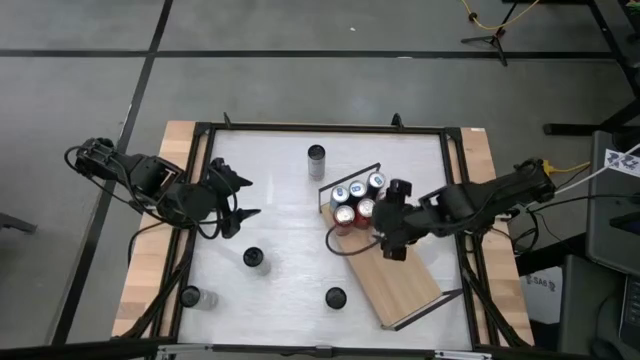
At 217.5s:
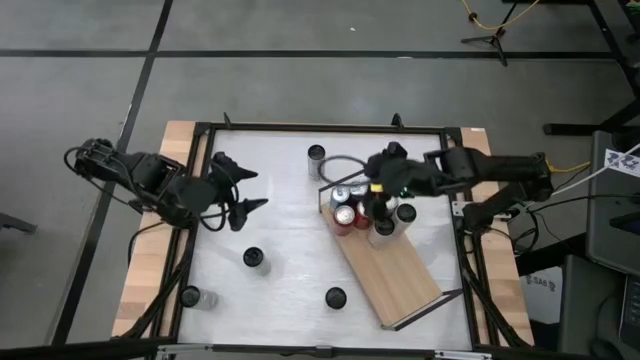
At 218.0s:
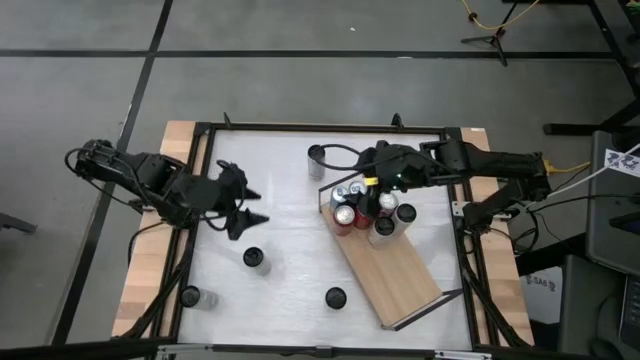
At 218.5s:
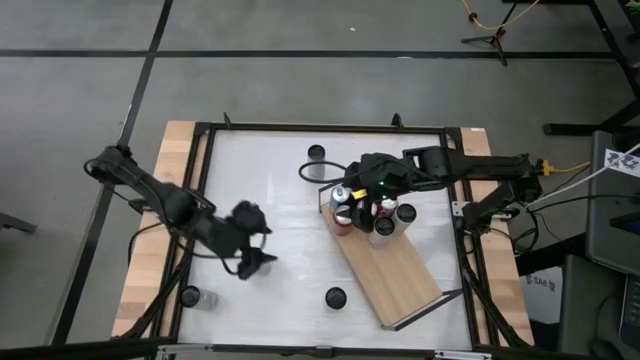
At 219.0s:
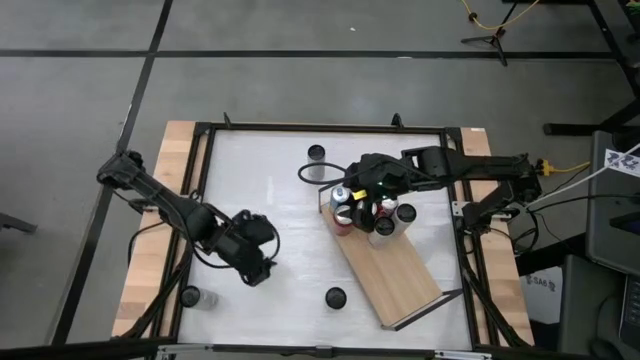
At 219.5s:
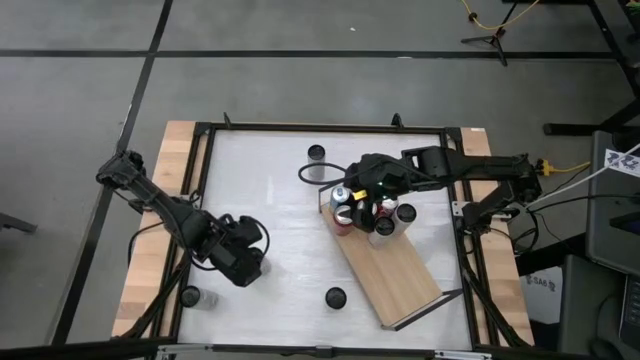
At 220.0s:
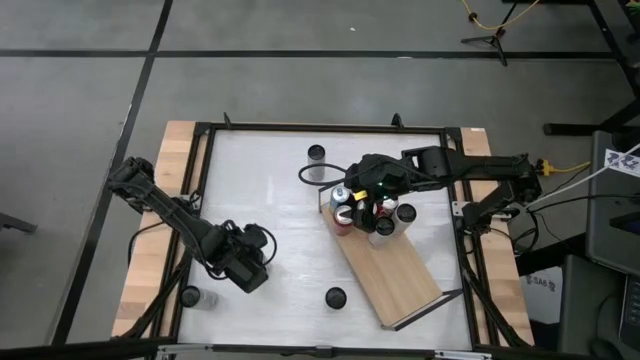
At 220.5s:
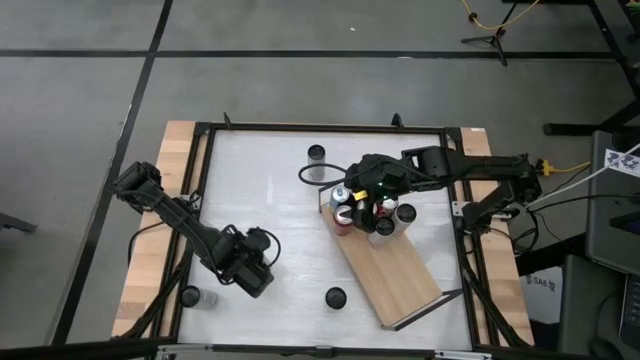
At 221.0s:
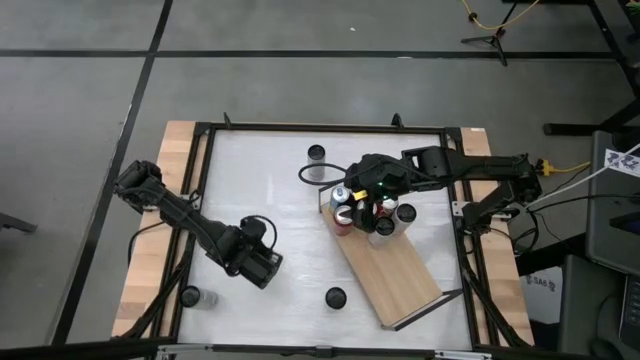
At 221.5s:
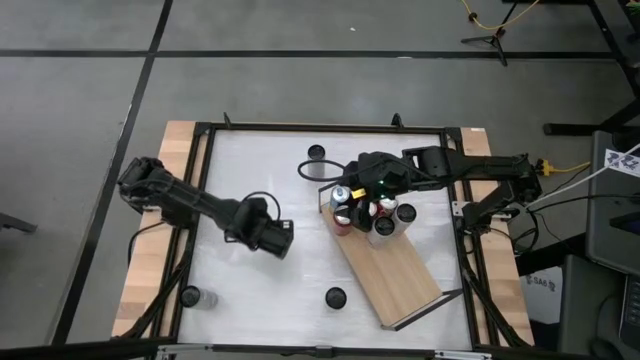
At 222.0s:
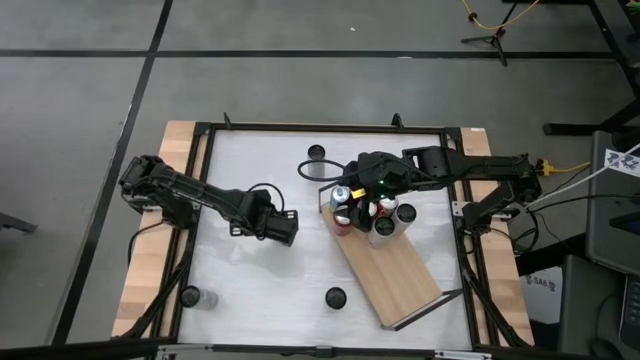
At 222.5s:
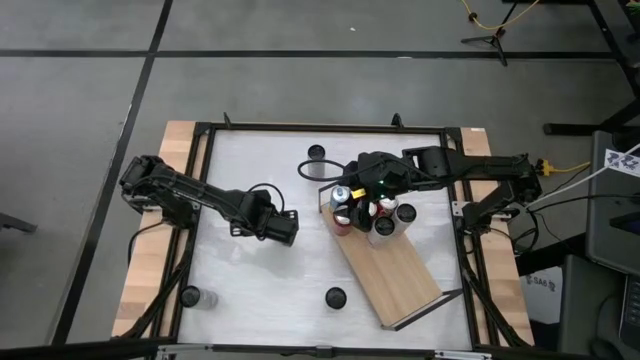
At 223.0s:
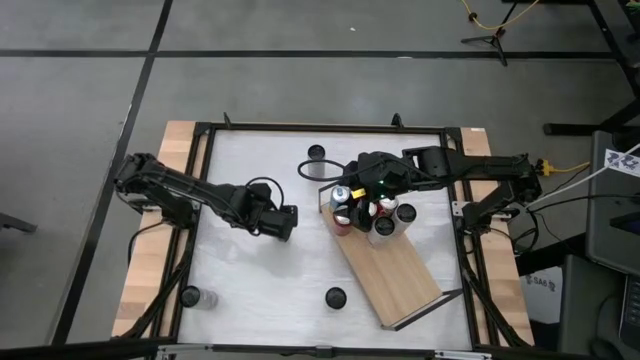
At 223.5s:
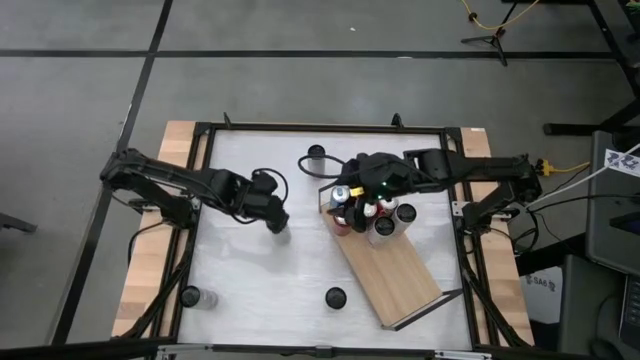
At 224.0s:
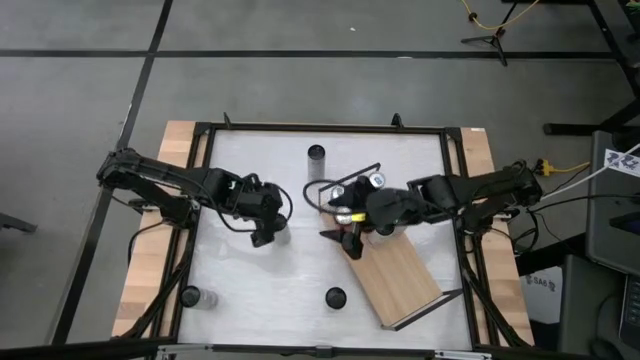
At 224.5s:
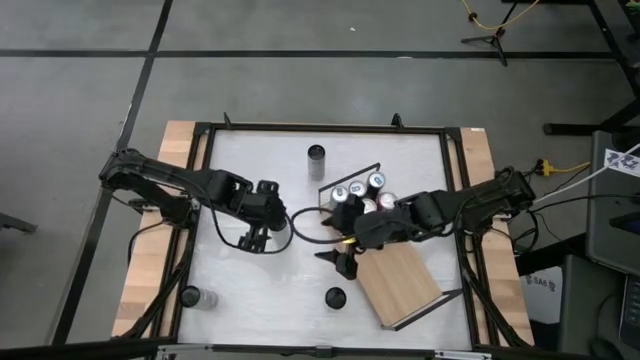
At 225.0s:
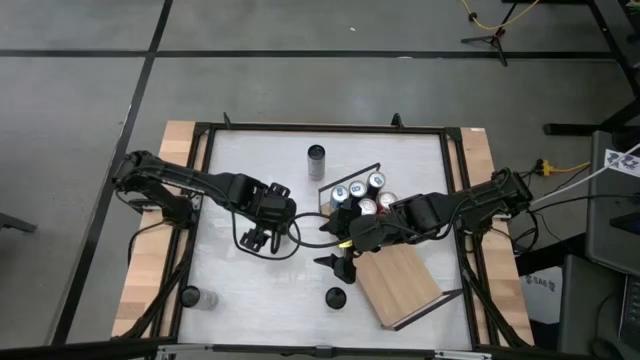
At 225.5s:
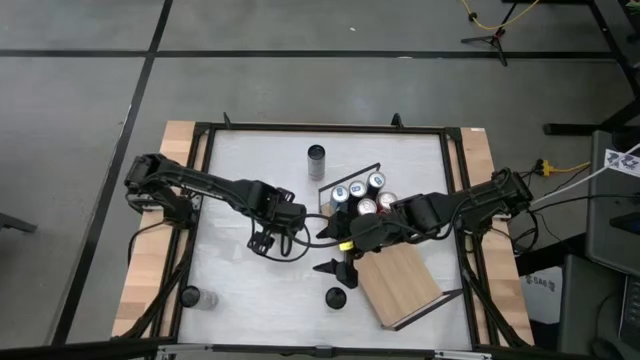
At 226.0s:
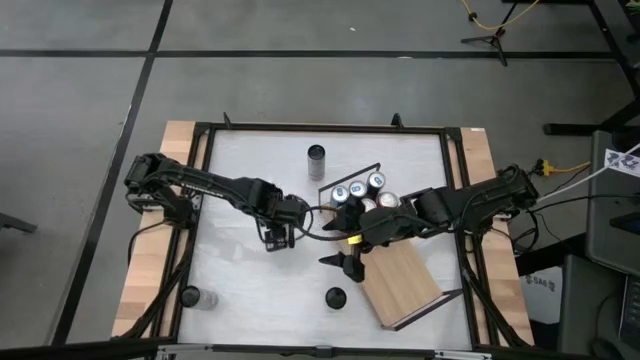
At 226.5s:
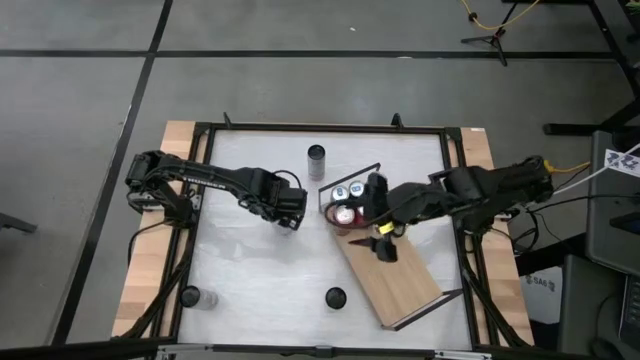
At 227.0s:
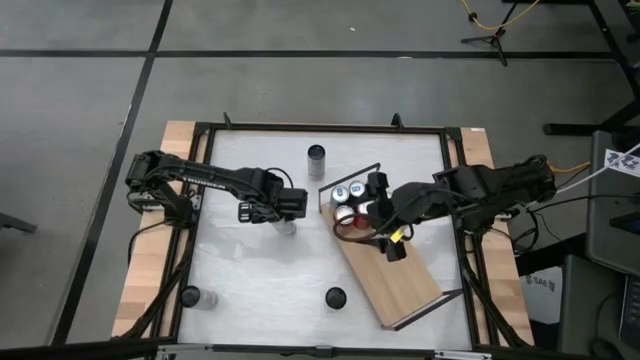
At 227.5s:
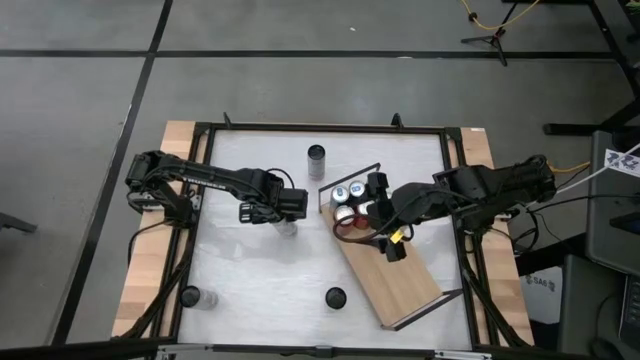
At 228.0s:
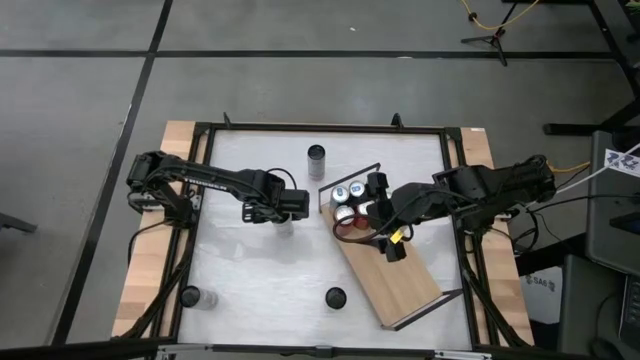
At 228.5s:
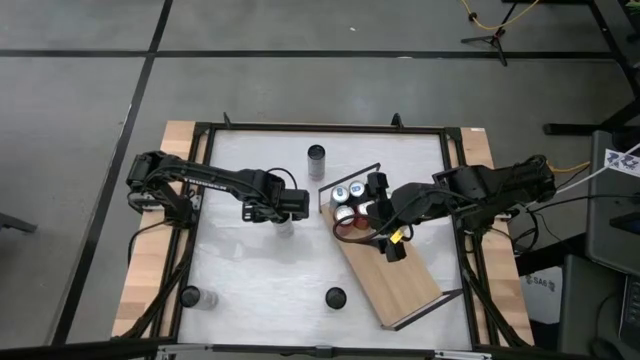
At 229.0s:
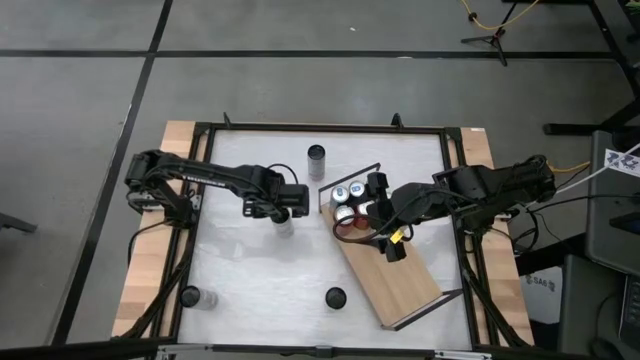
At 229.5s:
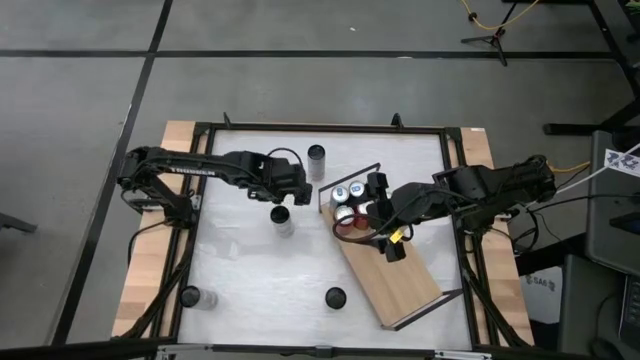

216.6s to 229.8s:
Task: Place canned beverage on shelf
Put the white pink soda can on the shelf aligned with the other white pink soda cans

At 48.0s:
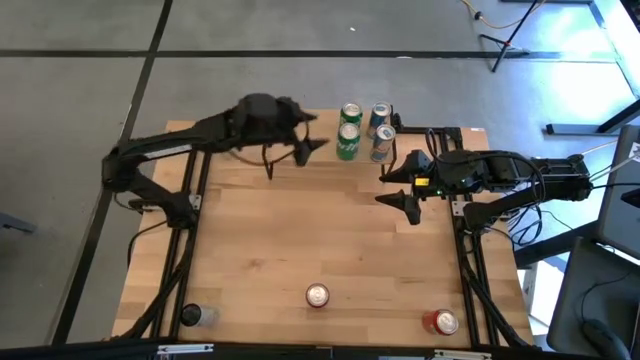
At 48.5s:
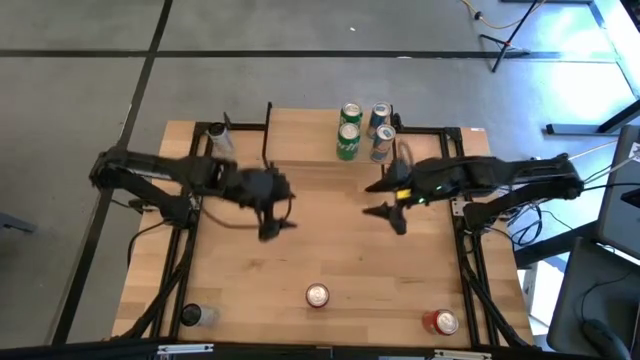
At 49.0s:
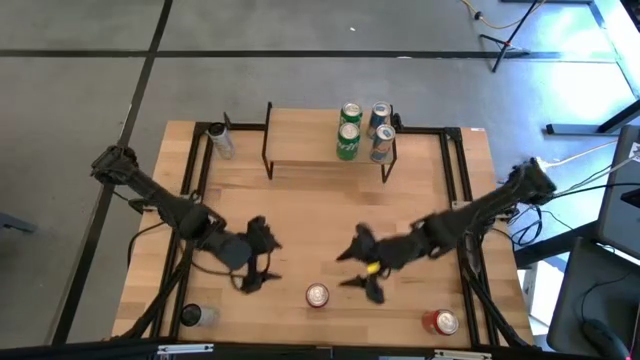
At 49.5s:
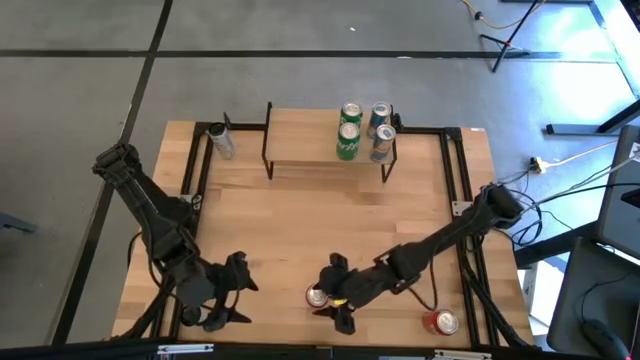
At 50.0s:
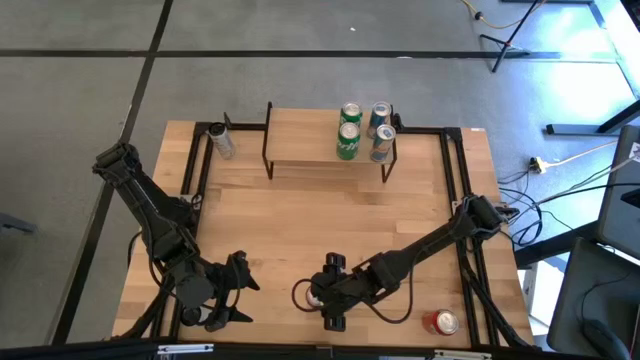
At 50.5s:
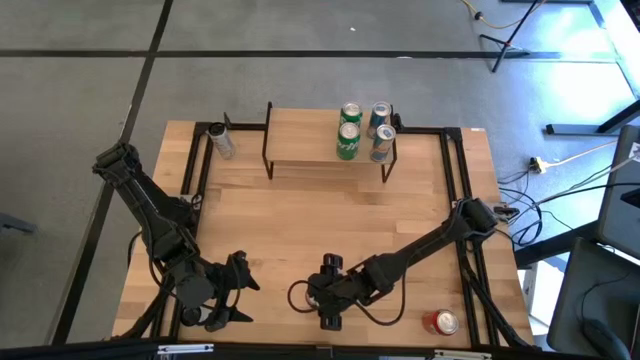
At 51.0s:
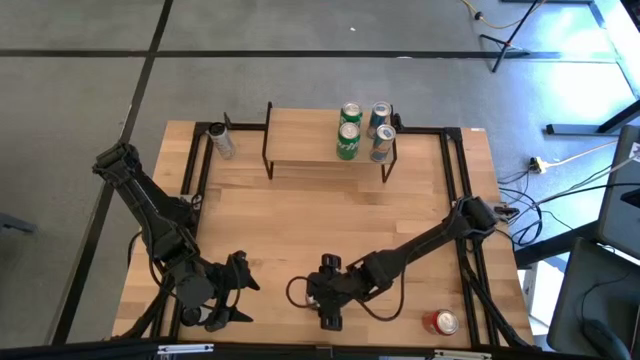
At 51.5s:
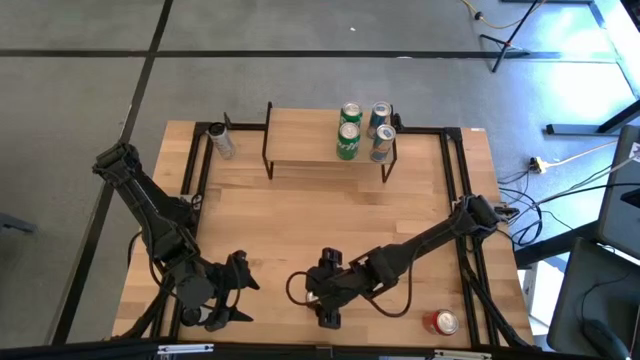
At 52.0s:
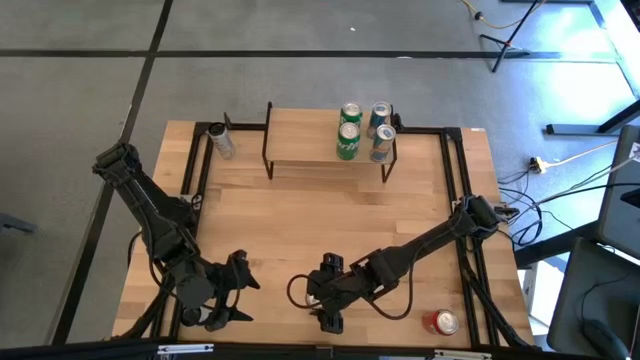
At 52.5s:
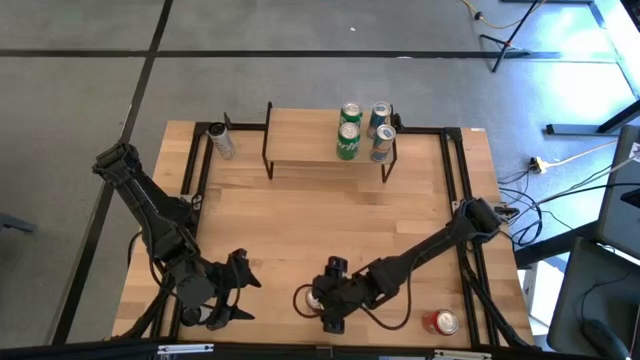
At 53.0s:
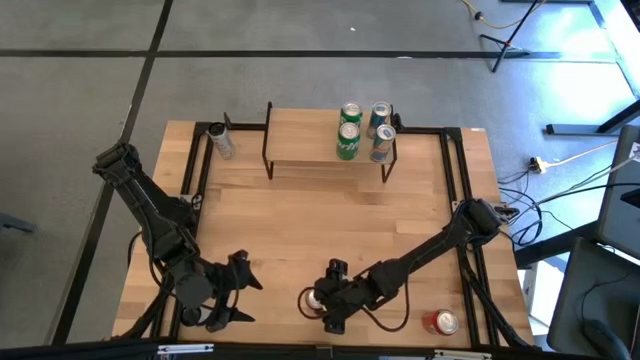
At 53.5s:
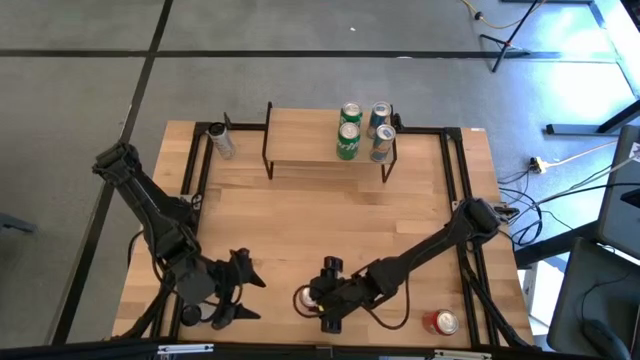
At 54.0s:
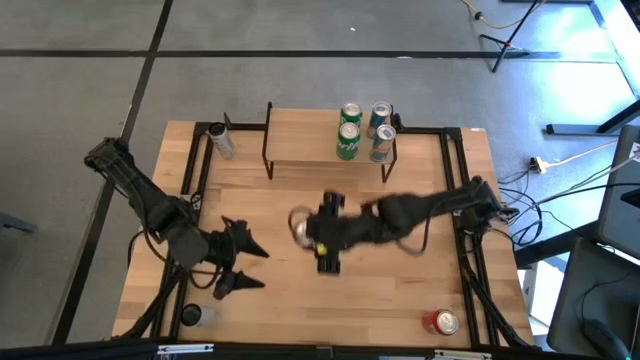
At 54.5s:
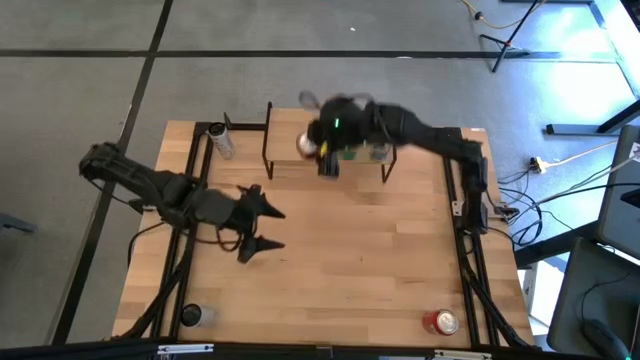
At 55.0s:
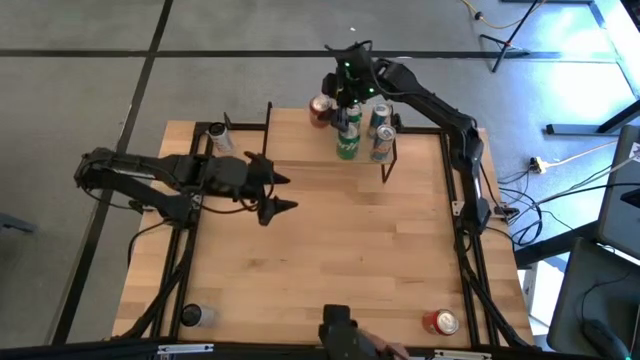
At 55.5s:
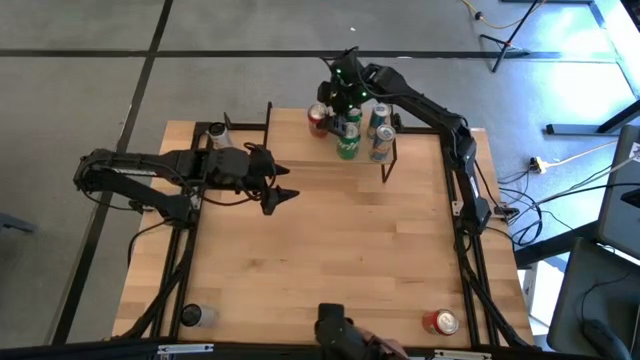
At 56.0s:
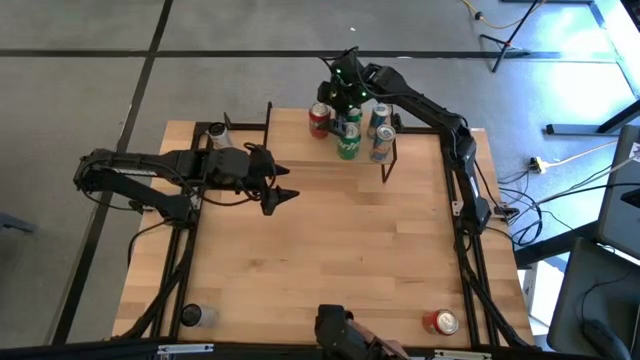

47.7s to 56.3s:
Task: Place canned beverage on shelf
Put the top red soda can on the shelf
